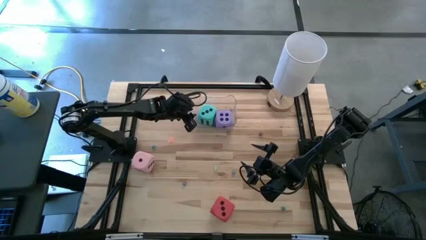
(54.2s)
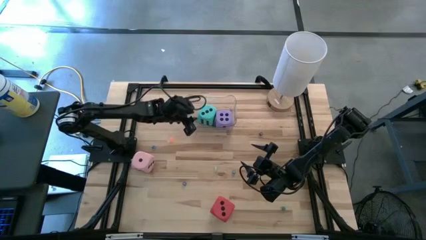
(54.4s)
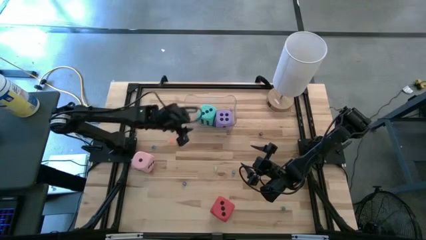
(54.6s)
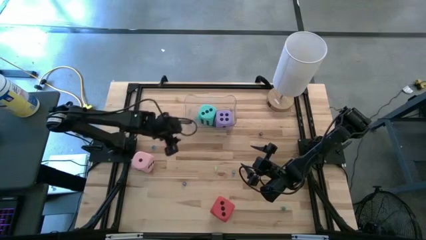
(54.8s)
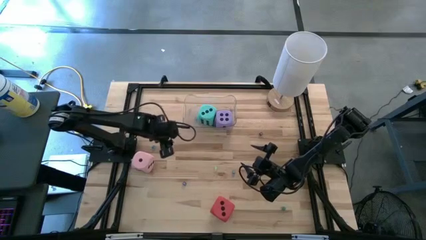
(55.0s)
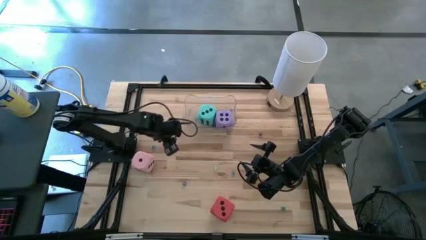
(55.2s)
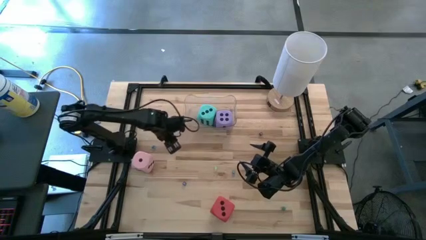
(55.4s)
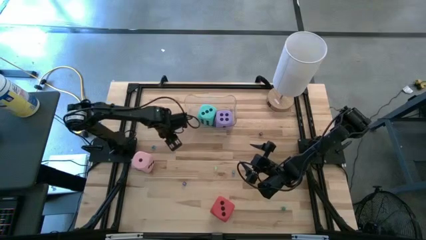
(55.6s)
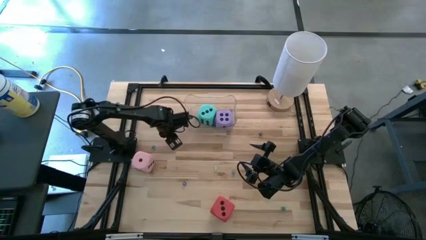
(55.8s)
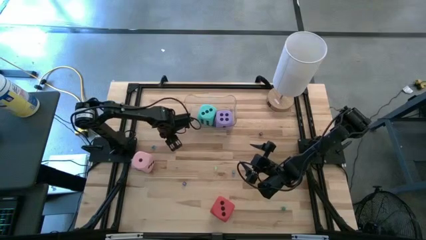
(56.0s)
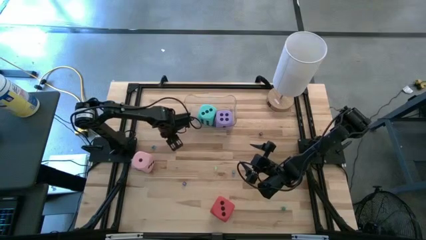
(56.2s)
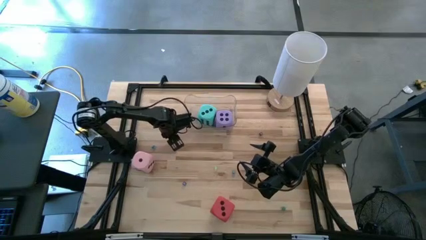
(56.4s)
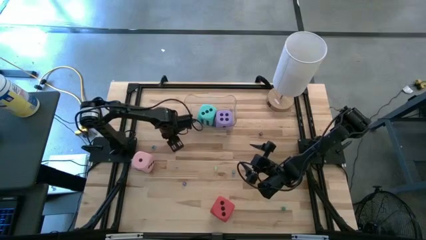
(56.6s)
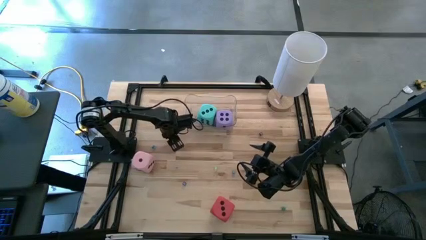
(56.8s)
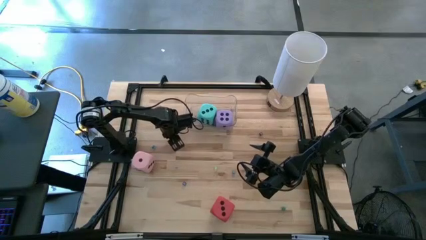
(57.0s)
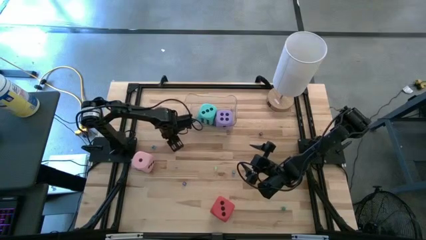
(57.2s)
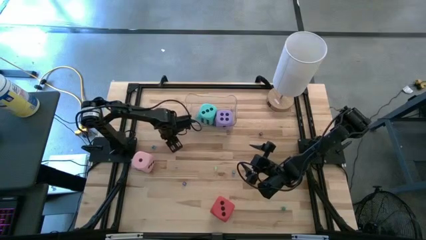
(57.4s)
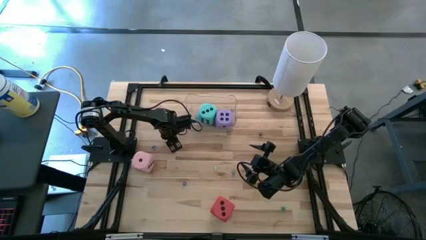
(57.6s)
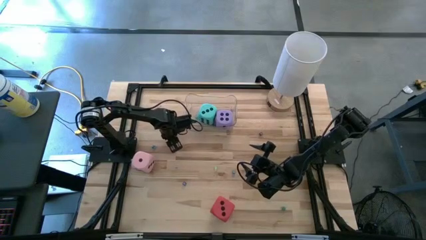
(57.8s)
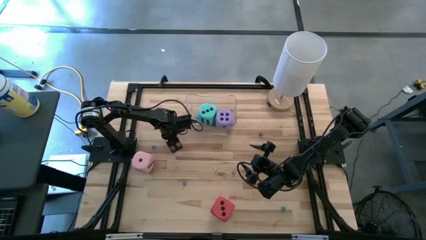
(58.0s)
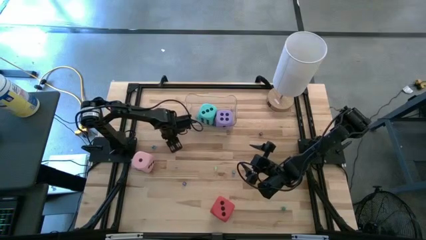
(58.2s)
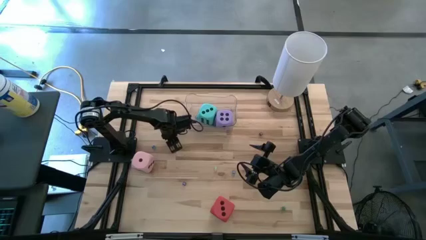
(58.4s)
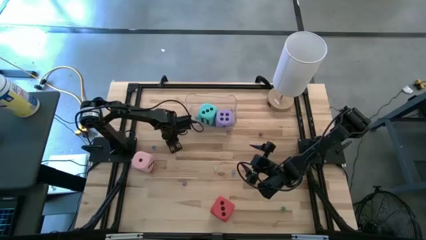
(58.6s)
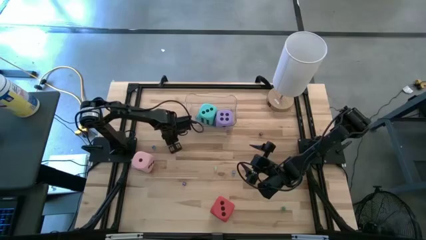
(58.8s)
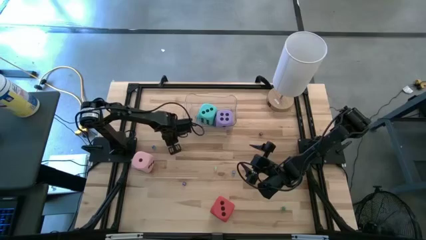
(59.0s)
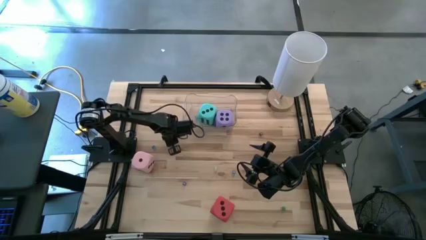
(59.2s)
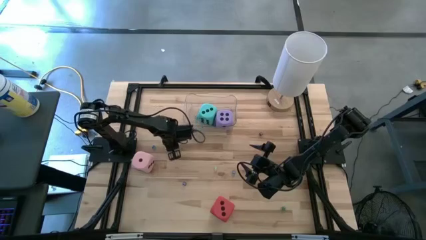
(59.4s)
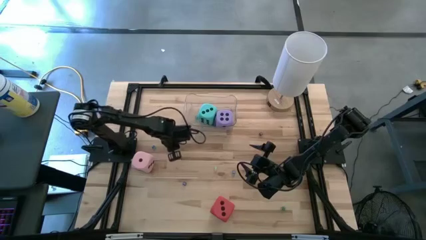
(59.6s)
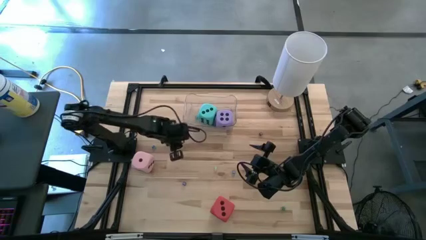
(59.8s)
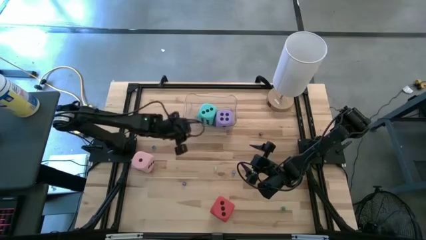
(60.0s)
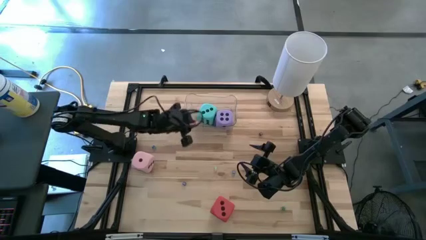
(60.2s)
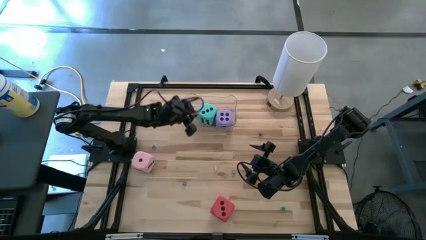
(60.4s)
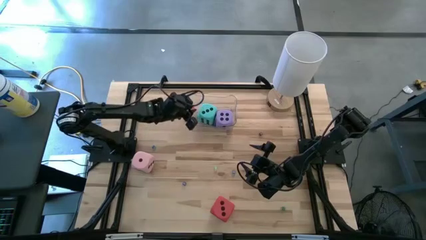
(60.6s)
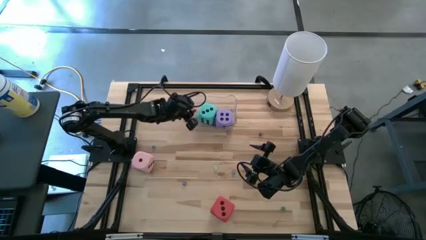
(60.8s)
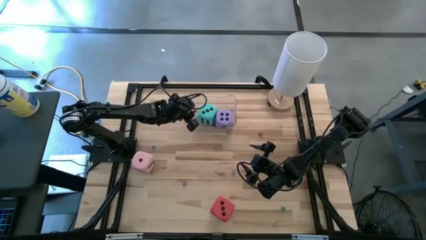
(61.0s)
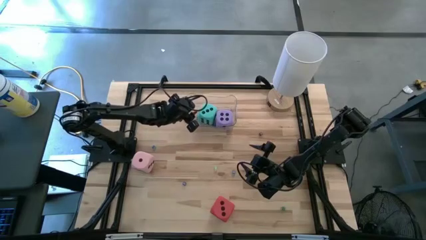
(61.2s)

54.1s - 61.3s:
Task: Pick & Place Dice
Put the orange dice into the transparent bin

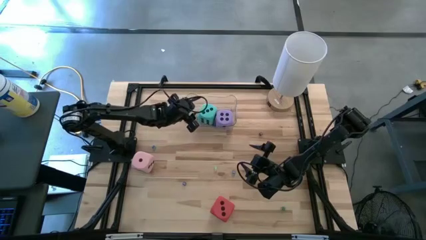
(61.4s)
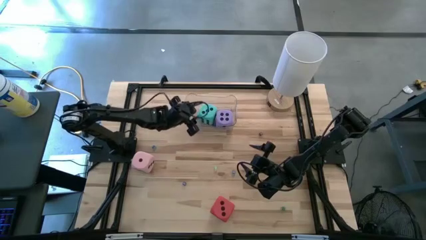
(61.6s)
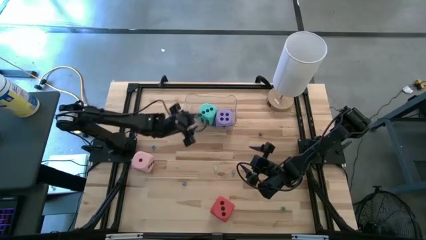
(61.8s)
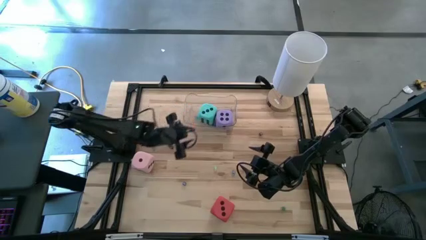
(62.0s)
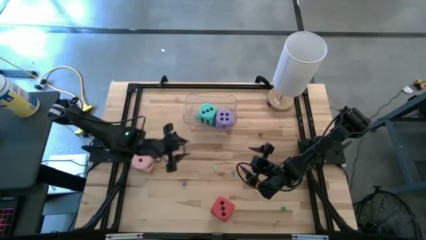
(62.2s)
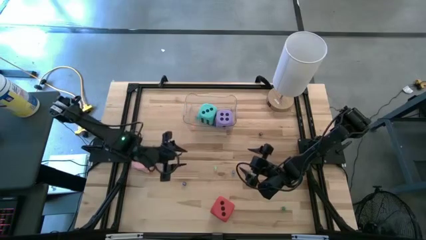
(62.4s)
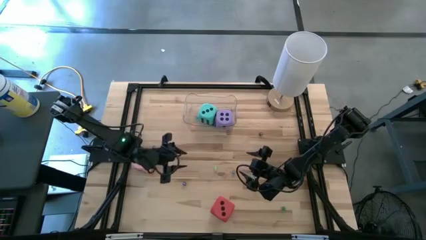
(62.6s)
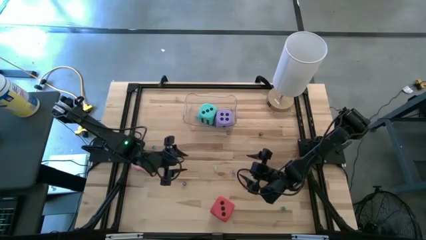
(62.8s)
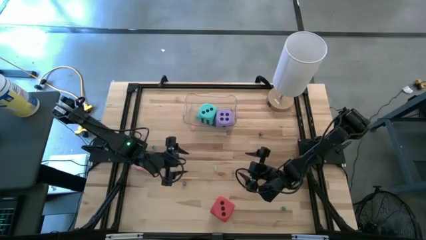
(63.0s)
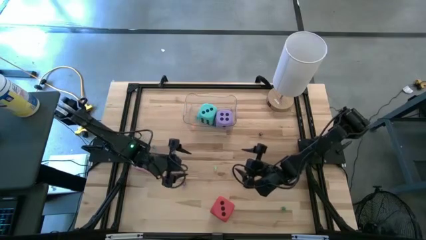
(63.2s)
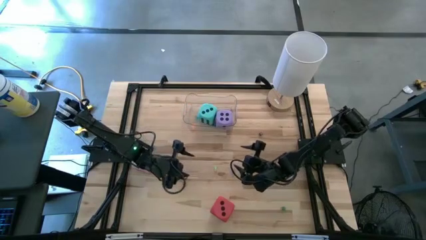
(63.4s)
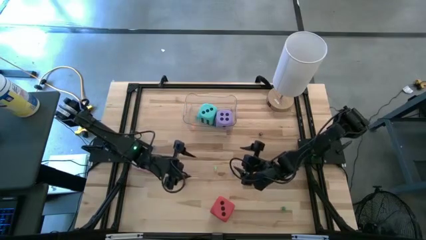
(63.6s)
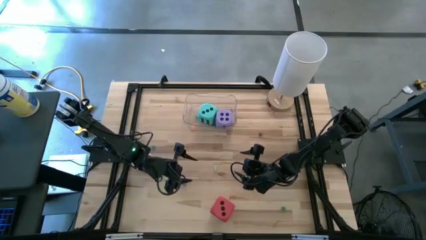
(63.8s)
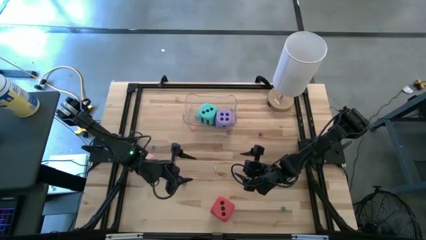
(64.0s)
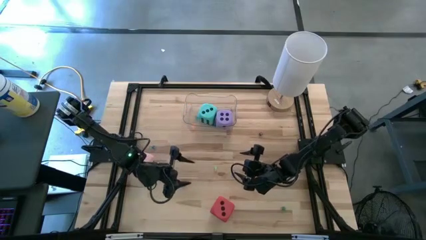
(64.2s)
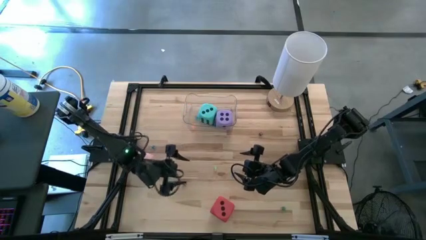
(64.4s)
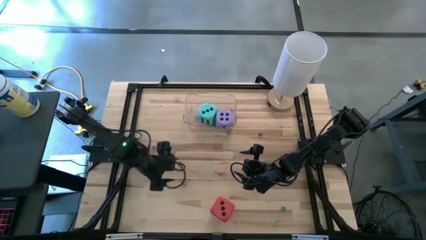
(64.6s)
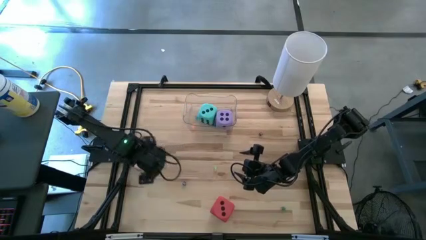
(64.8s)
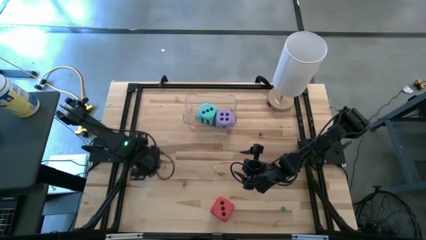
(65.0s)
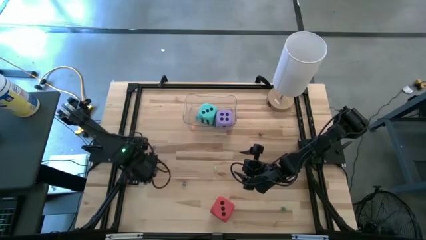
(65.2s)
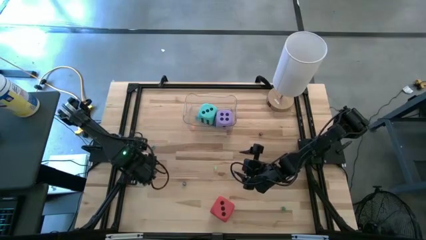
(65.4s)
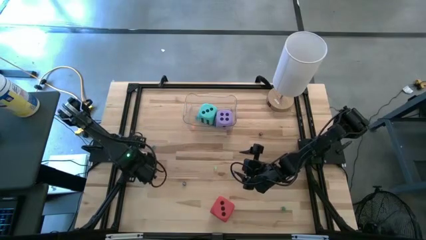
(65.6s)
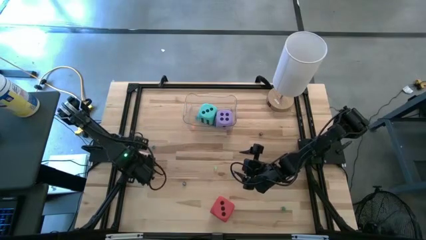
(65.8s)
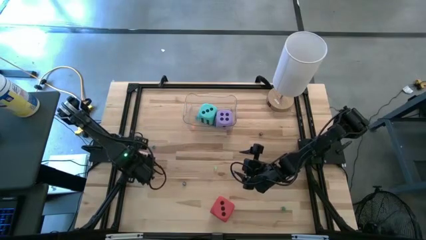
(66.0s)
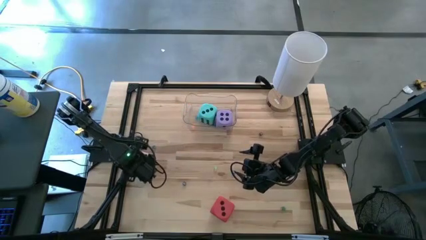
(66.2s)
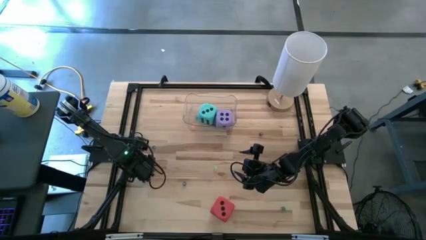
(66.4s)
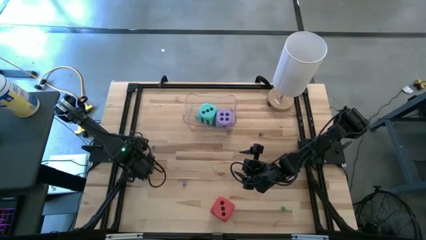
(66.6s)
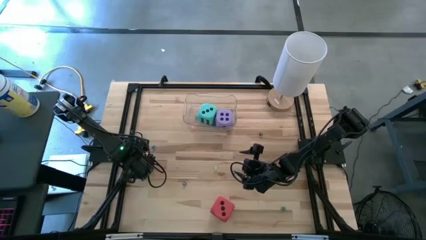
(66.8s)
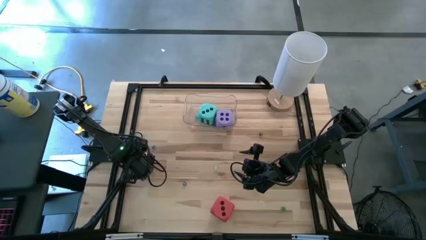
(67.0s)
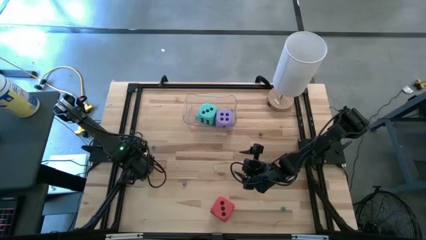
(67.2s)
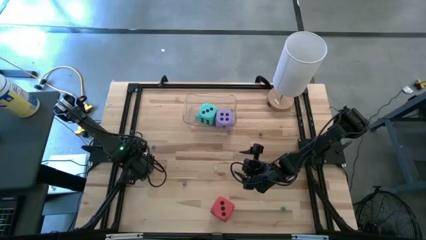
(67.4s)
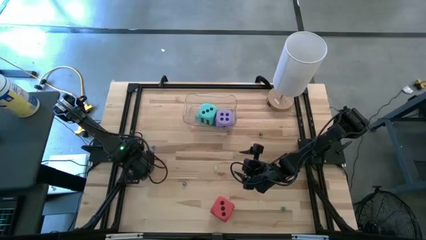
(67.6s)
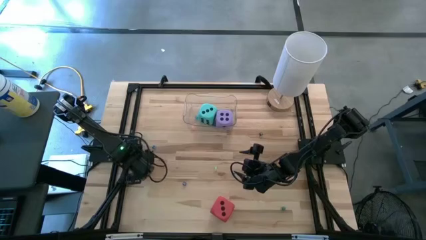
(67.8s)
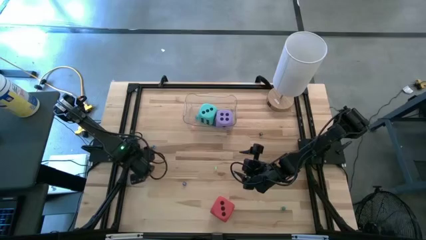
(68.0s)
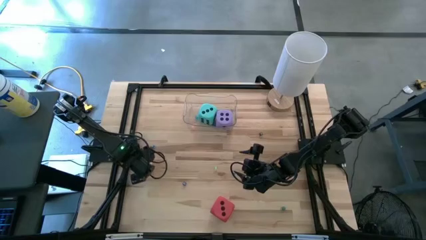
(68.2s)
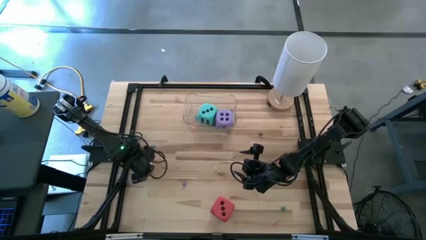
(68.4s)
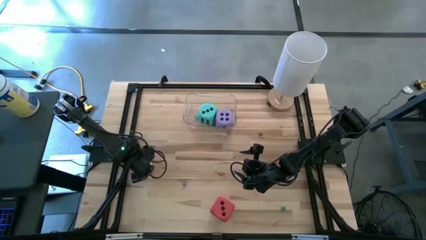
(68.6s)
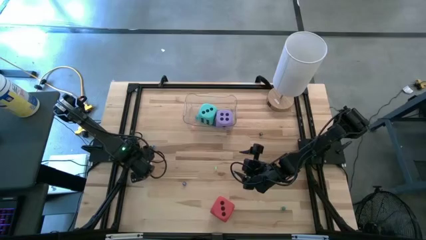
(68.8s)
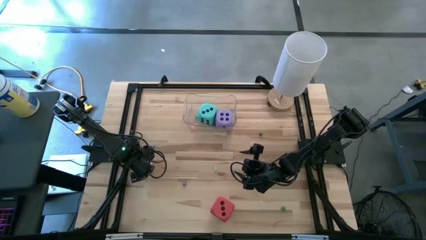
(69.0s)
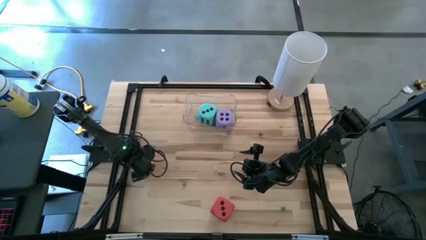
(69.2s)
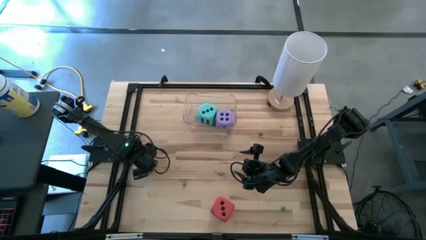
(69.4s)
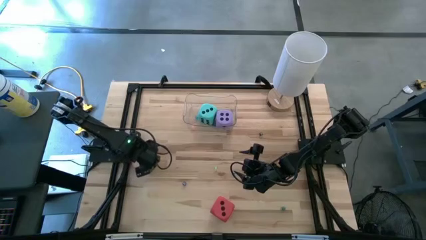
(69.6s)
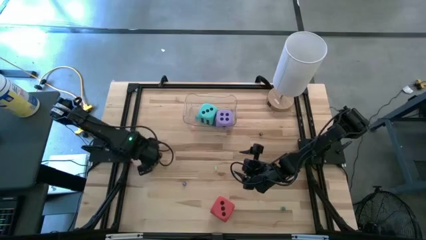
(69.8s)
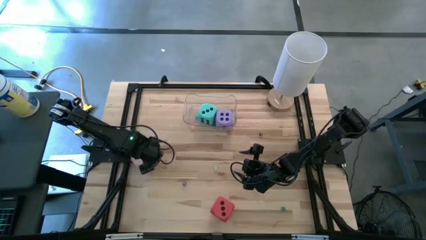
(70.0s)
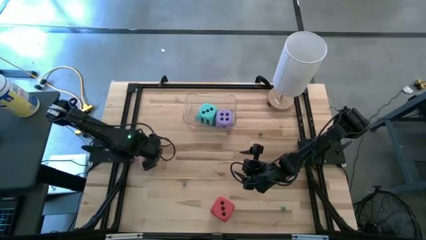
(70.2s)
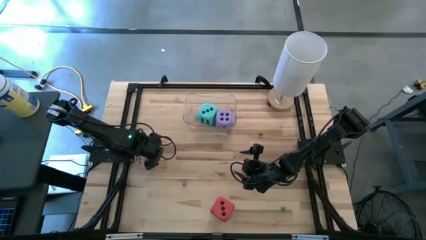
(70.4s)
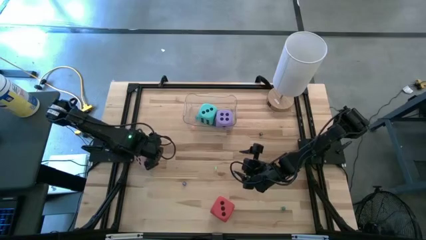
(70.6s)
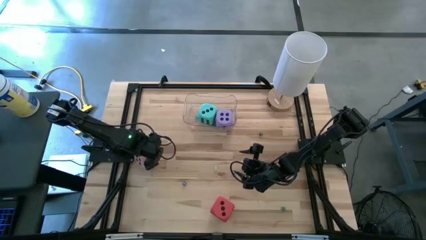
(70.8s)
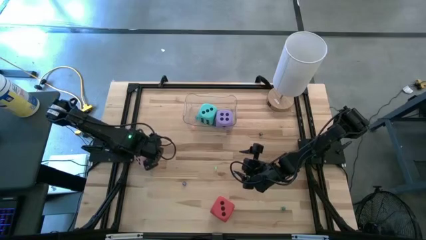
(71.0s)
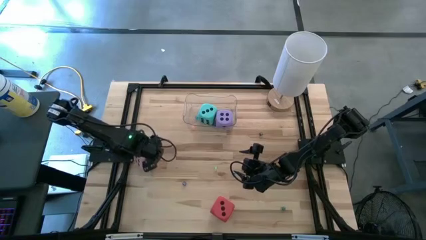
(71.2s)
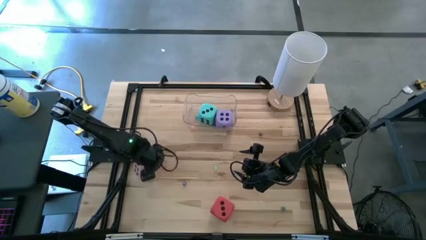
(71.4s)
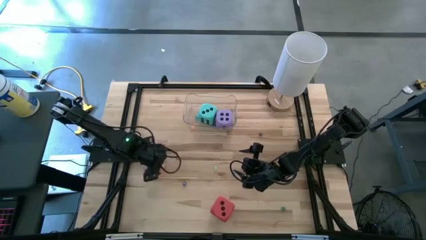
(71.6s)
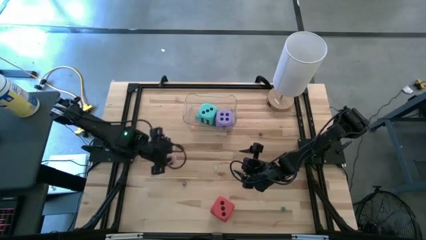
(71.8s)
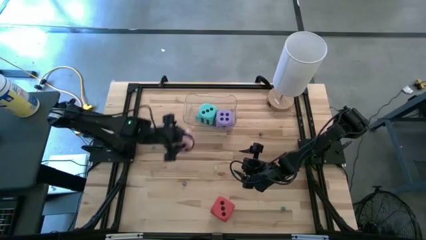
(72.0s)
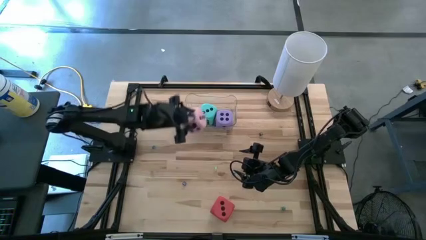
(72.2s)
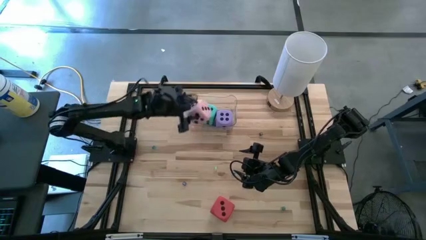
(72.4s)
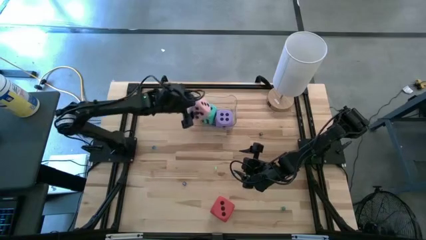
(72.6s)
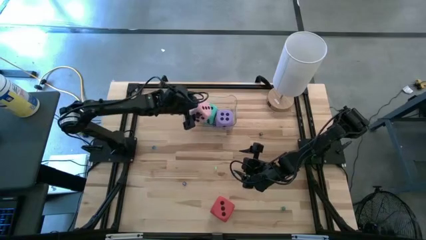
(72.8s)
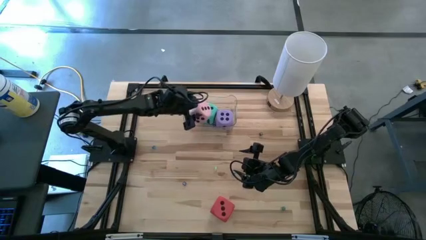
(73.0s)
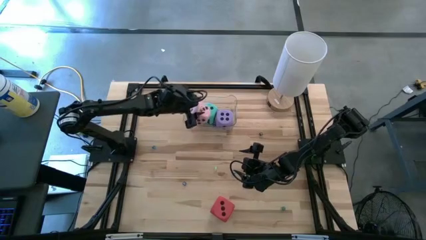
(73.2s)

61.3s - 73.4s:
Put the large pink dice into the transparent bin
